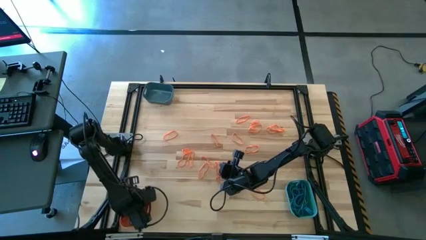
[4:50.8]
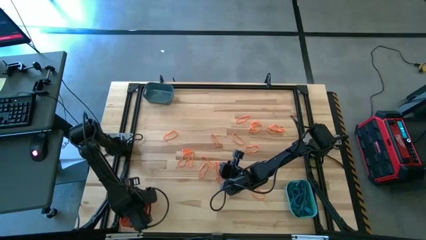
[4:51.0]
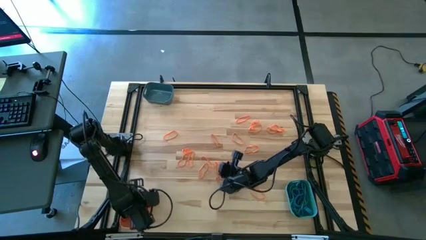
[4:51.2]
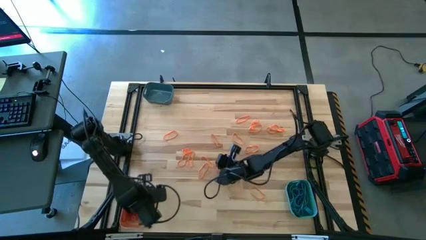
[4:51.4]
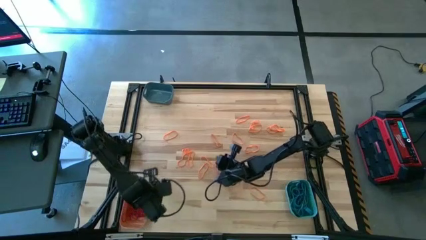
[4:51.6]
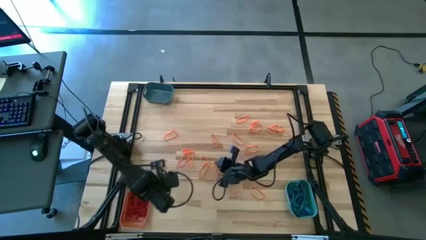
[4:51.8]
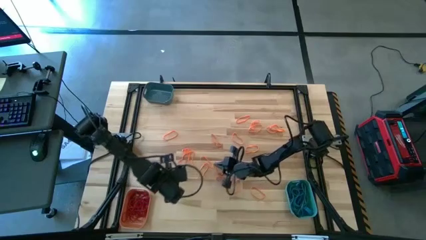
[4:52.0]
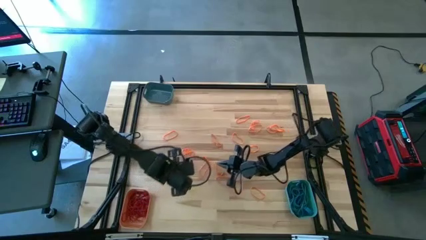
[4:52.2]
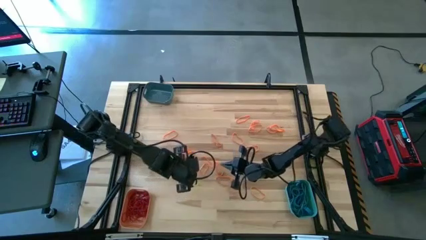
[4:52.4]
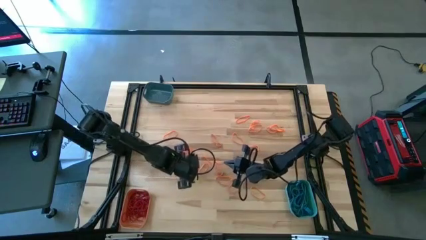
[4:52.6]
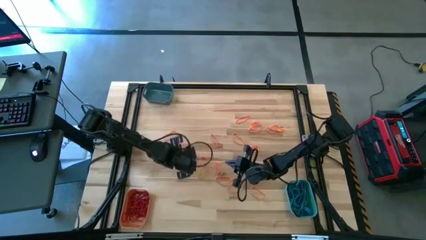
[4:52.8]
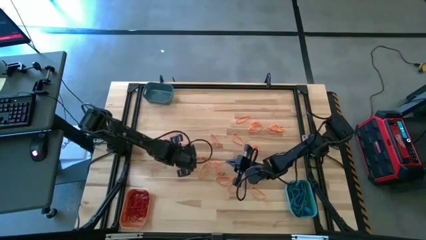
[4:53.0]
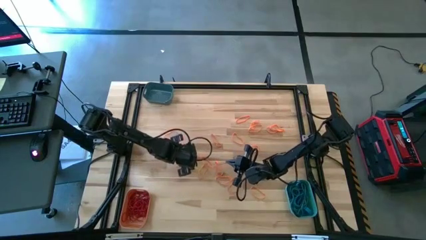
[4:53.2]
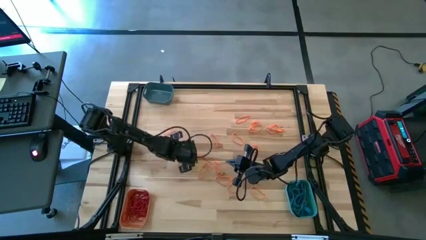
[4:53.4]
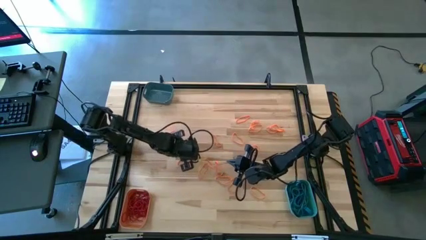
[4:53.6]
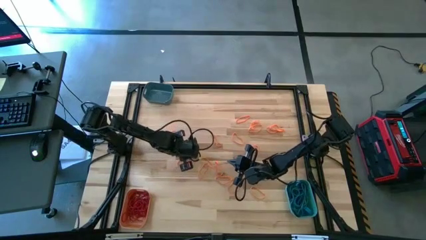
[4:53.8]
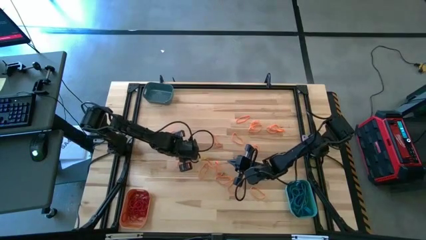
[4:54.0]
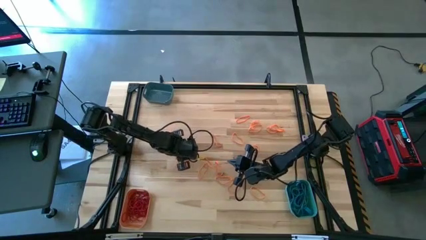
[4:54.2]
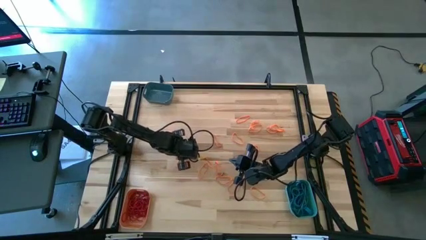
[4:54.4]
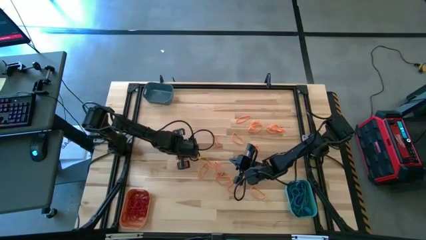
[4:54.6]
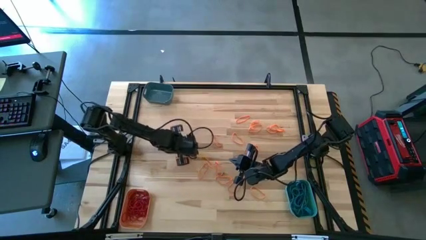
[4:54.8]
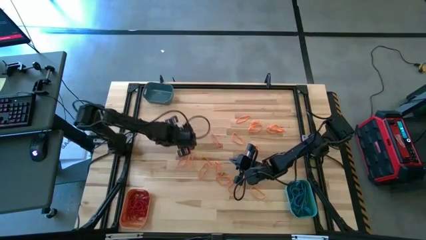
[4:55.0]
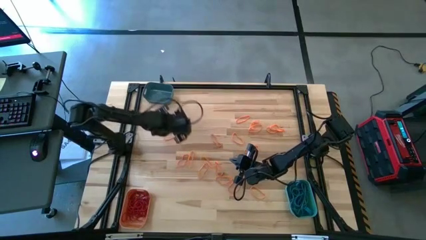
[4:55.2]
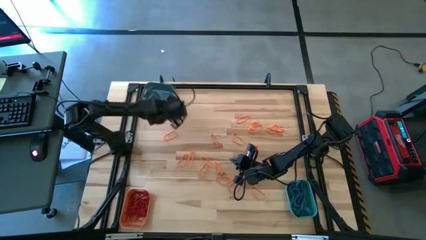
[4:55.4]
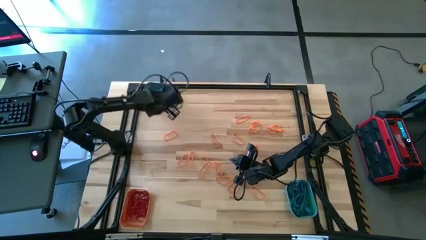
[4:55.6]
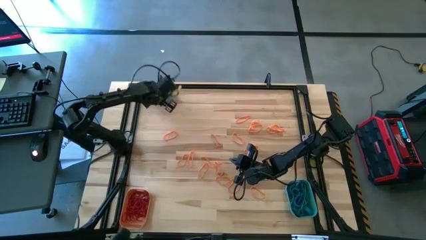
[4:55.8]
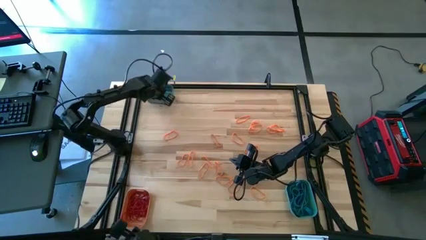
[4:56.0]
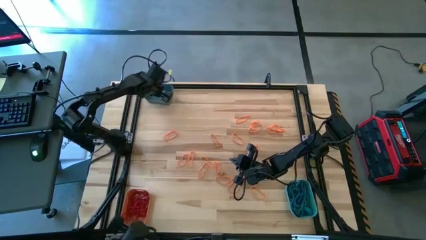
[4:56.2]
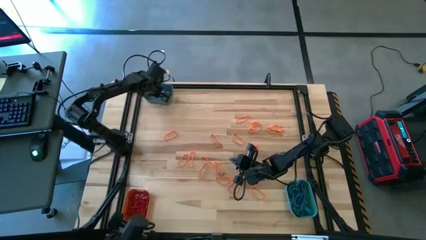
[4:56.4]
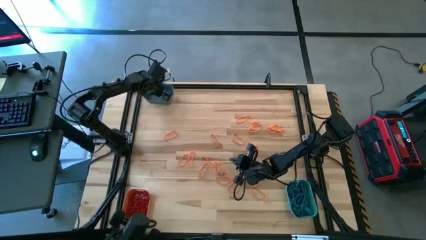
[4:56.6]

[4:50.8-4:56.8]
Task: Sort rubber bands into baskets
Put the orange rubber band into the blue bin

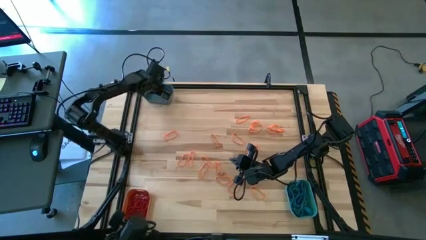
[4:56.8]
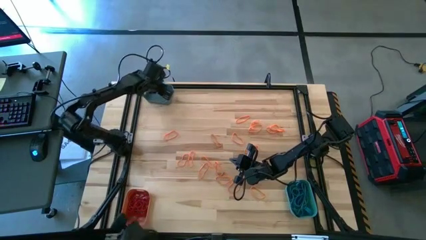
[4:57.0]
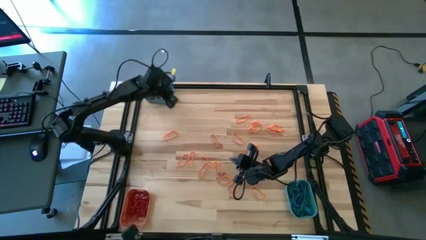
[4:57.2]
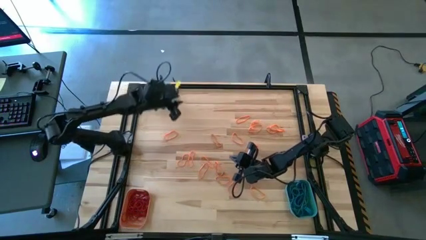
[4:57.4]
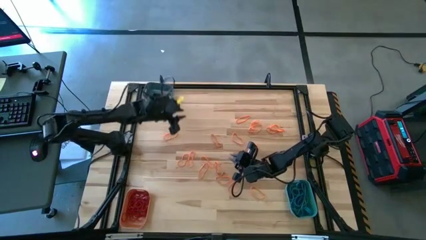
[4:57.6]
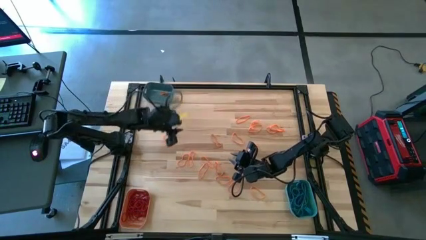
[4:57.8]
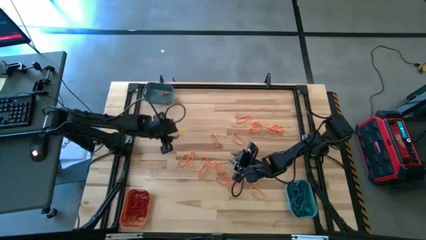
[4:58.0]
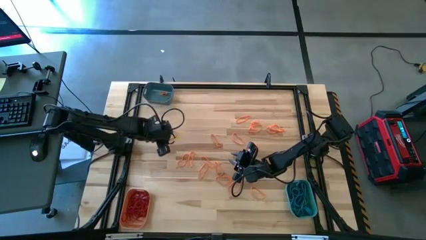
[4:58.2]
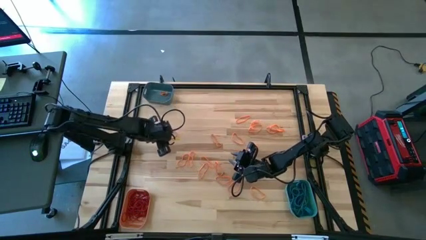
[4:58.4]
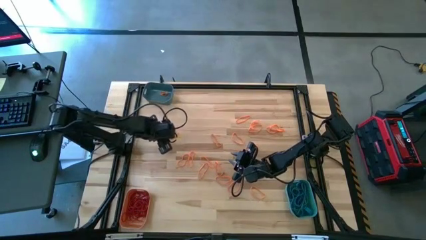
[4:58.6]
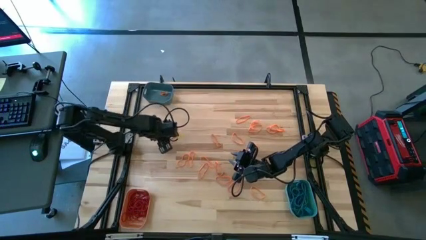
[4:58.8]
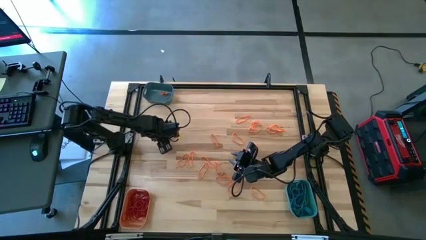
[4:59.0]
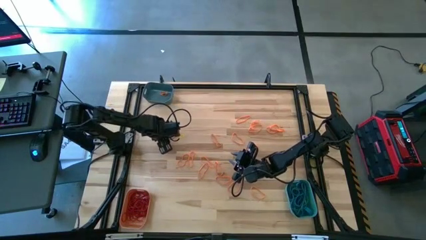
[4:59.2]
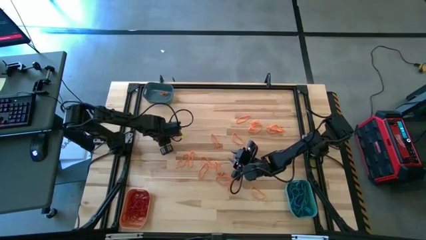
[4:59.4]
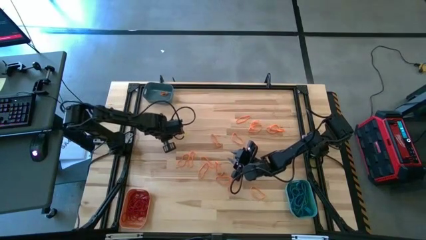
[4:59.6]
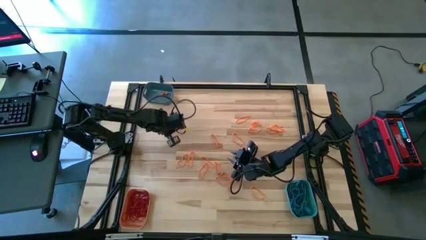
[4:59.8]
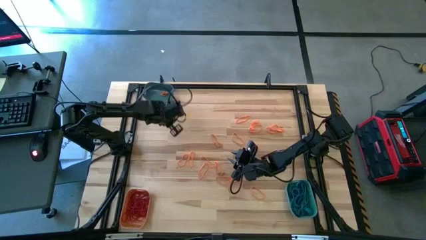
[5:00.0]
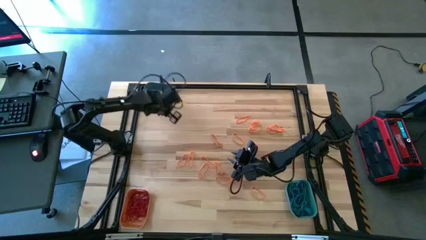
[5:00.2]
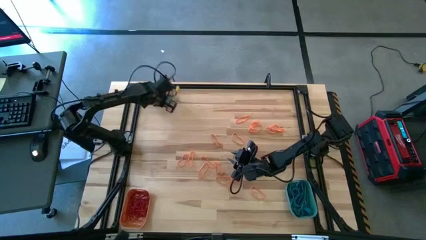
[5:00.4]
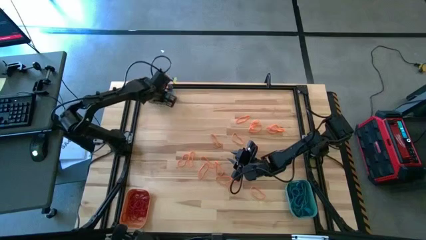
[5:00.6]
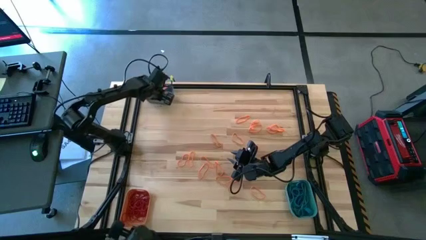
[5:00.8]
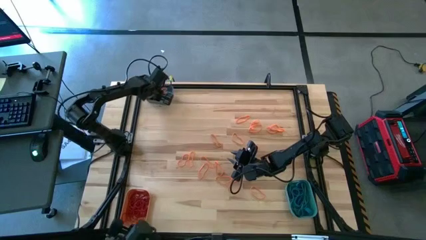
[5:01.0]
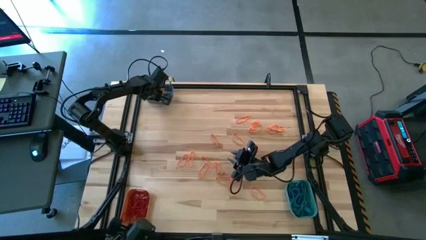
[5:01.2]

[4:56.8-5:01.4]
Put the orange rubber band into the blue bin

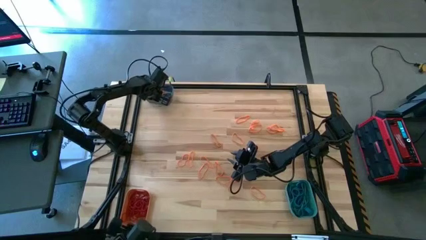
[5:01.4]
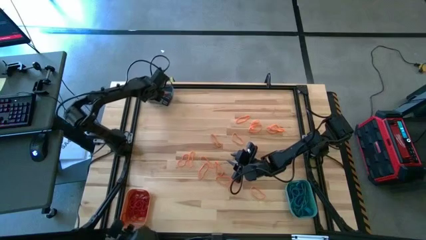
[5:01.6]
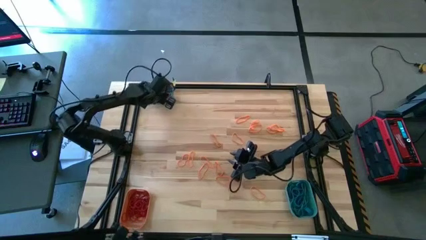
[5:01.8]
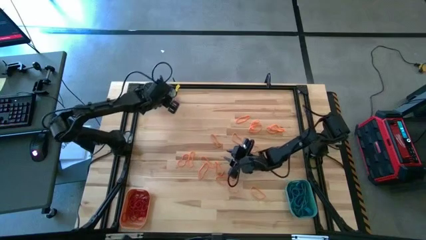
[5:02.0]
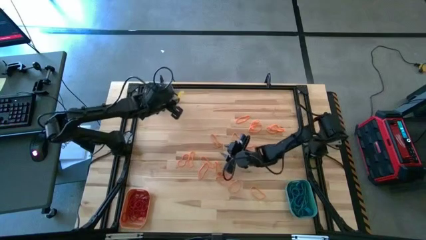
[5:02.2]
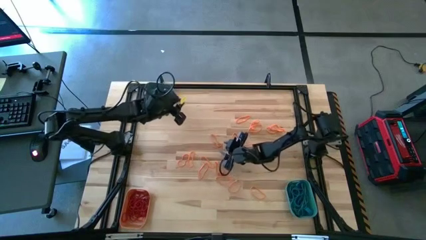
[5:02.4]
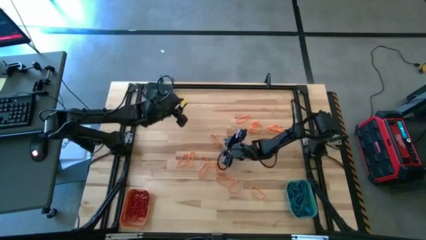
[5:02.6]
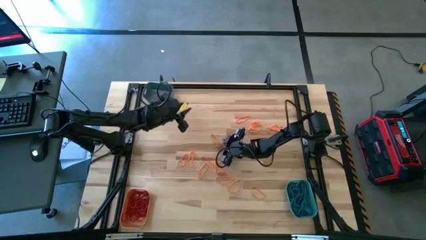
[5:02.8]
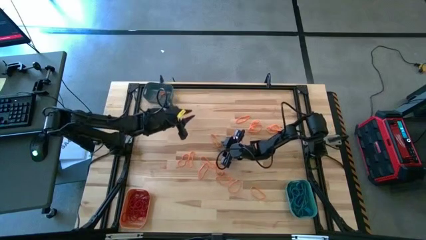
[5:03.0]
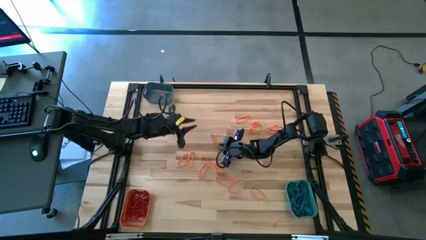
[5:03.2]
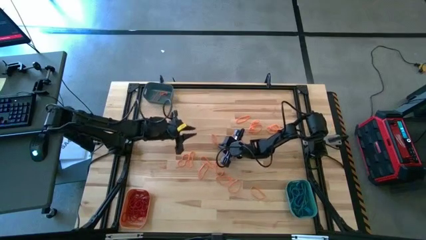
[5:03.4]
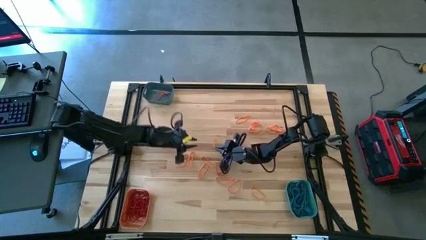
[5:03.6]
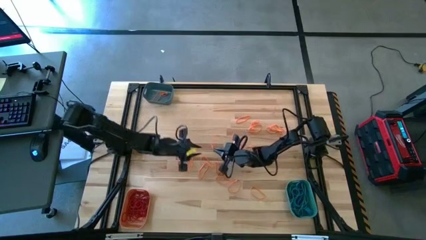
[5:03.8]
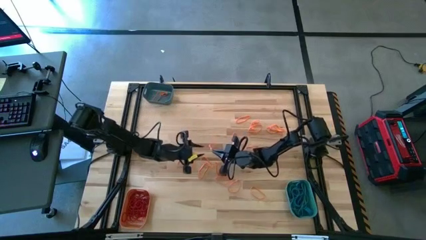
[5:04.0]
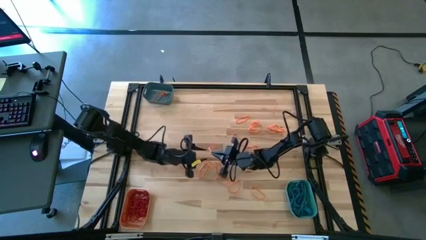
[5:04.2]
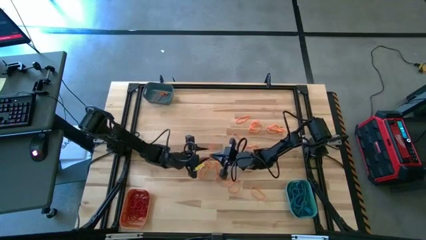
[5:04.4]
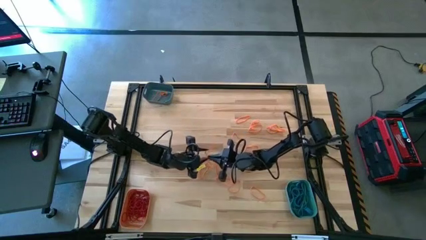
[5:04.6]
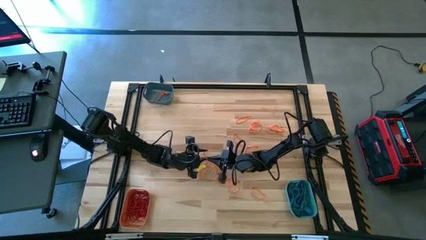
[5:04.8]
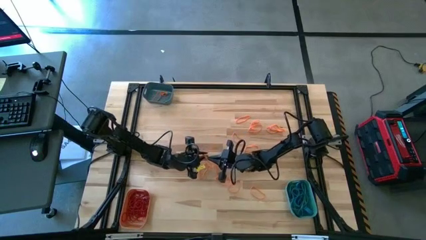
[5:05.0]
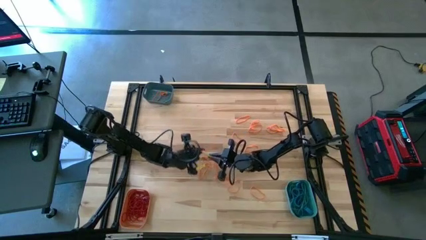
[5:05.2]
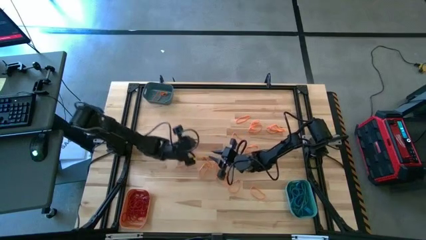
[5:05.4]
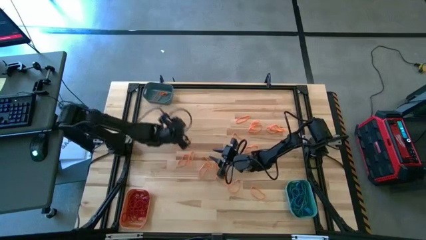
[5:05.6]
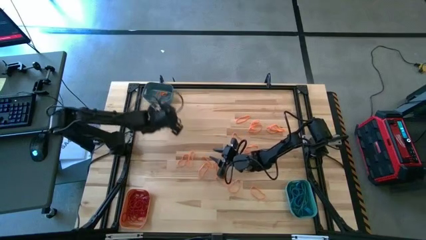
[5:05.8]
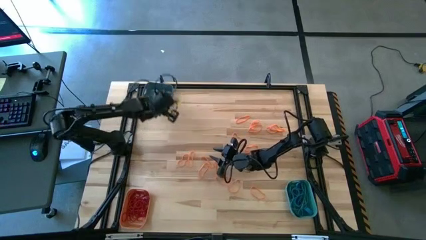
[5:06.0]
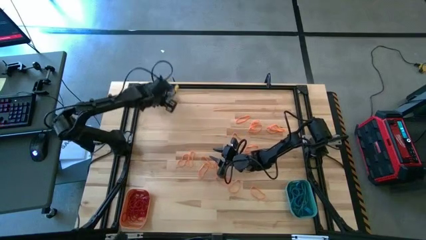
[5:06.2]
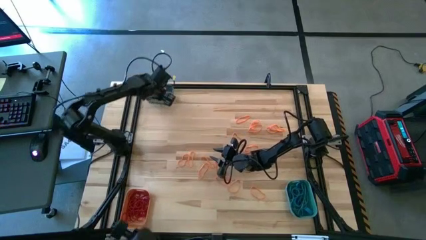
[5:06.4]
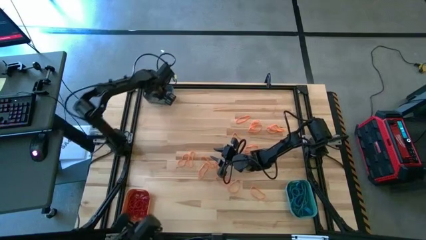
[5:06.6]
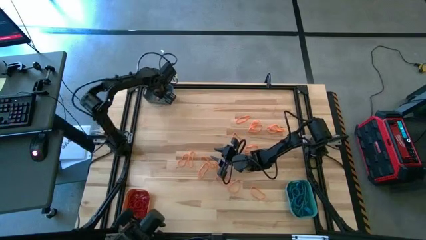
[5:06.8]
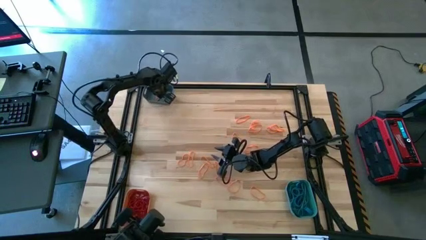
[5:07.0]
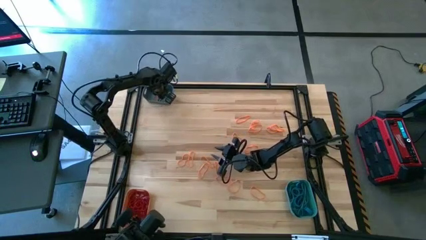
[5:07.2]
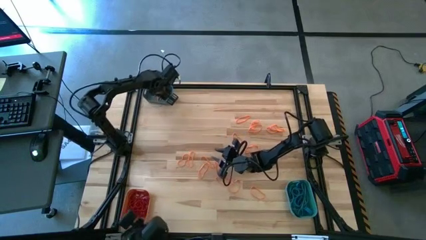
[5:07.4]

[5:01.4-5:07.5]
Put the orange rubber band into the blue bin

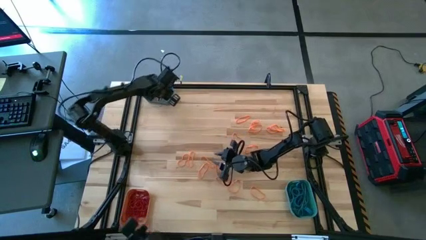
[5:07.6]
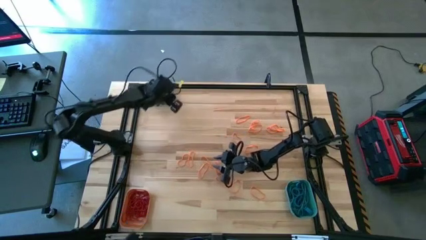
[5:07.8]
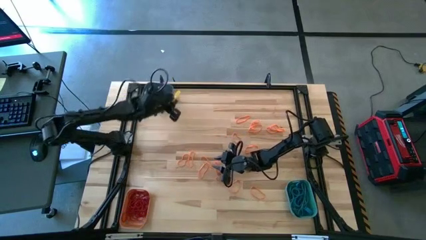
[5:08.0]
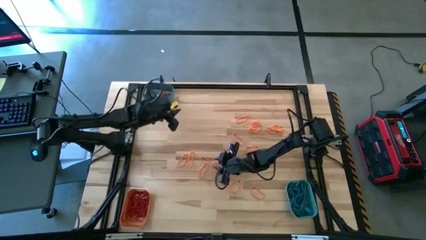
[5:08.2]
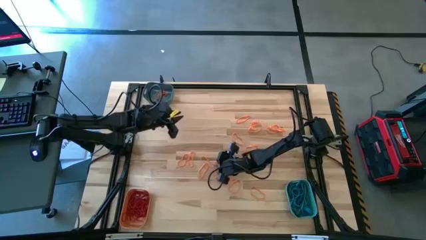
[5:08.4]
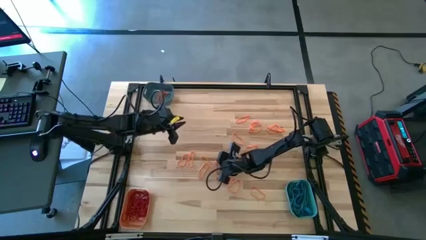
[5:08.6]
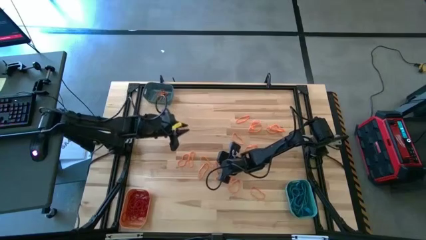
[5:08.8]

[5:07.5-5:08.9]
Put the orange rubber band into the blue bin
